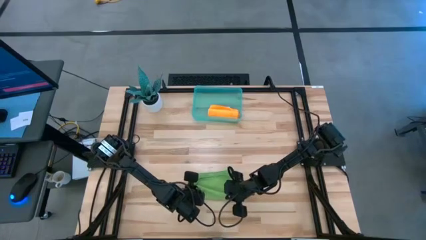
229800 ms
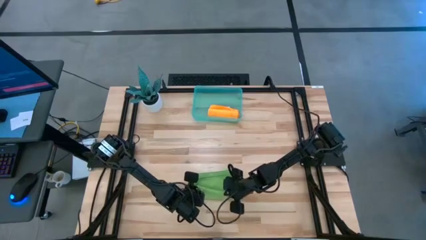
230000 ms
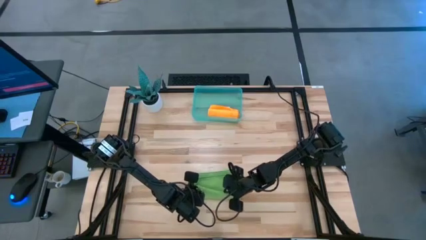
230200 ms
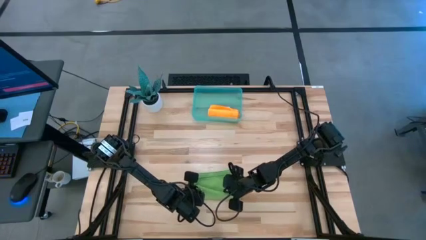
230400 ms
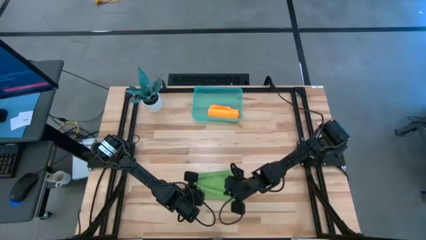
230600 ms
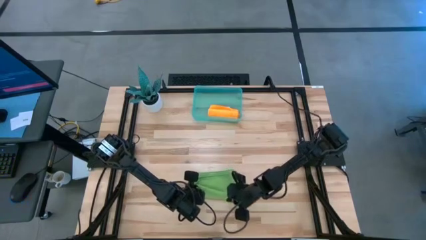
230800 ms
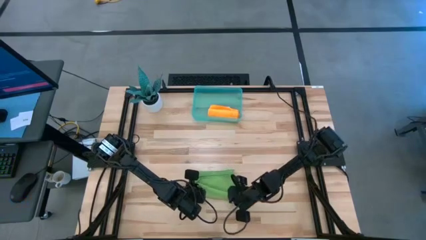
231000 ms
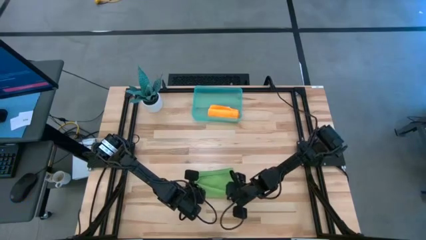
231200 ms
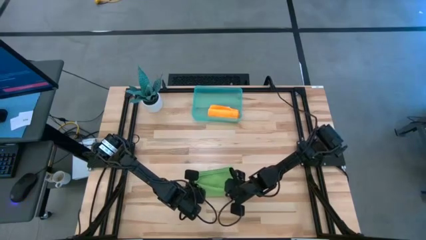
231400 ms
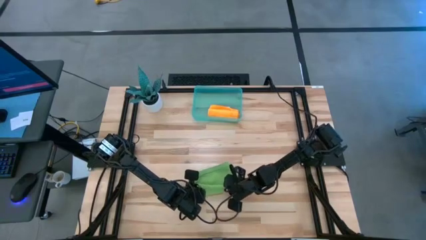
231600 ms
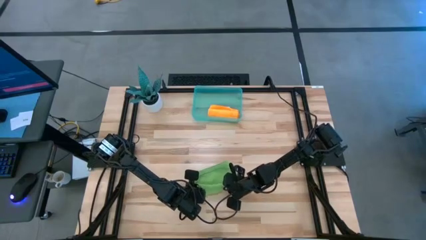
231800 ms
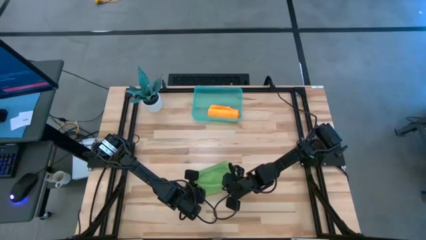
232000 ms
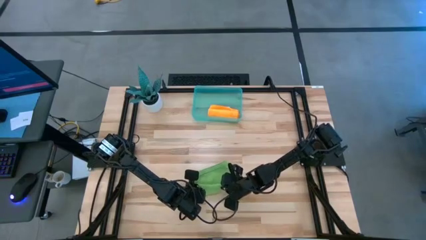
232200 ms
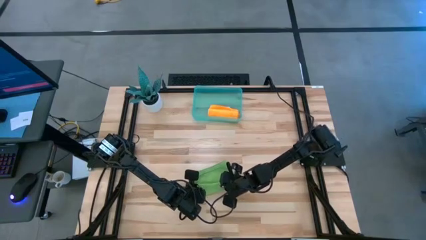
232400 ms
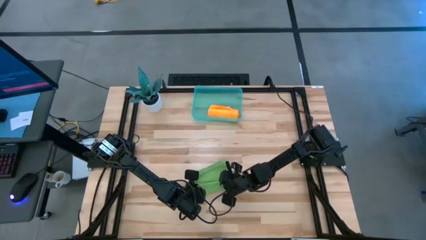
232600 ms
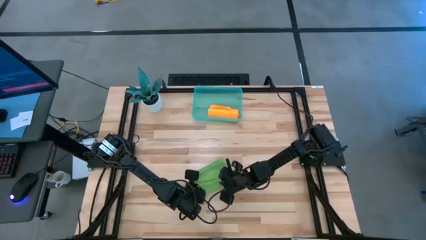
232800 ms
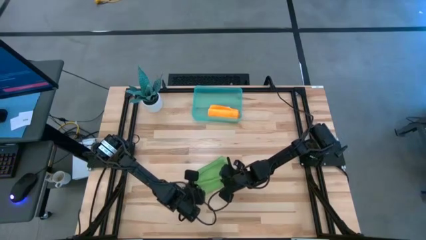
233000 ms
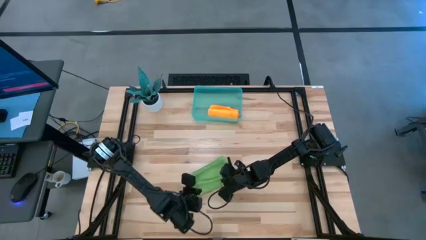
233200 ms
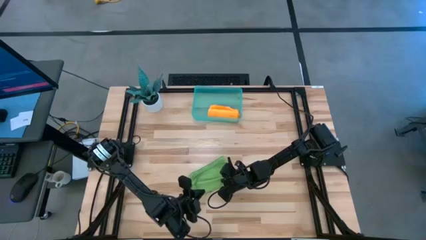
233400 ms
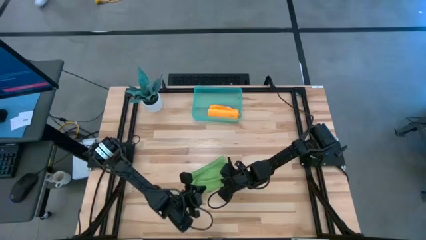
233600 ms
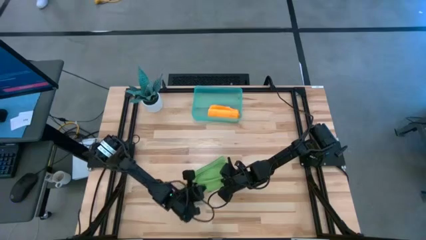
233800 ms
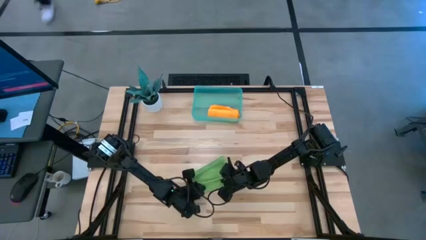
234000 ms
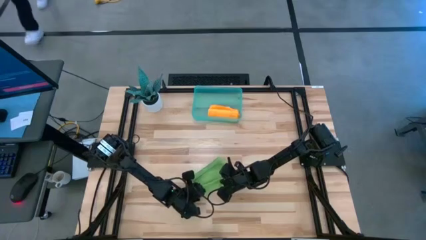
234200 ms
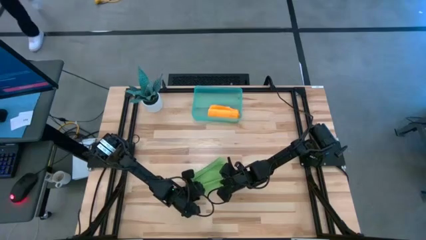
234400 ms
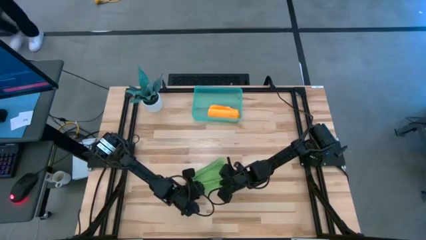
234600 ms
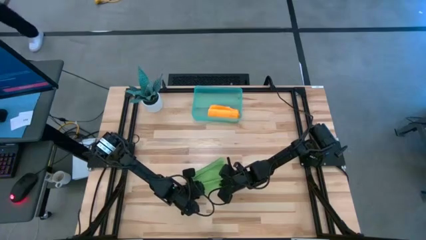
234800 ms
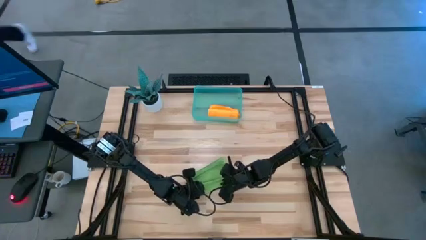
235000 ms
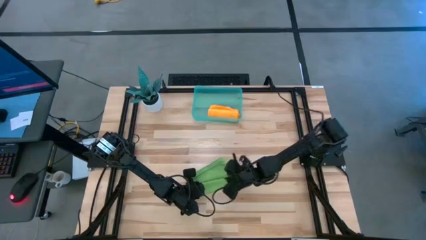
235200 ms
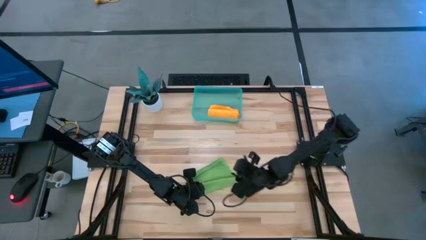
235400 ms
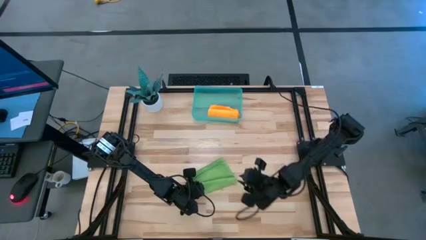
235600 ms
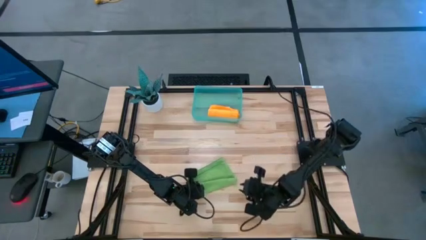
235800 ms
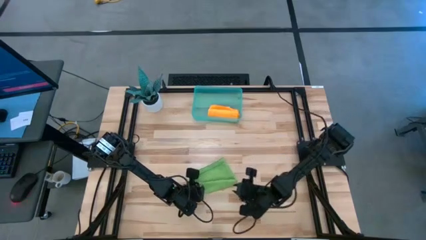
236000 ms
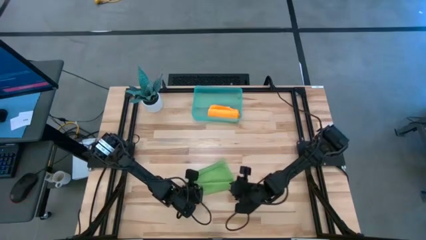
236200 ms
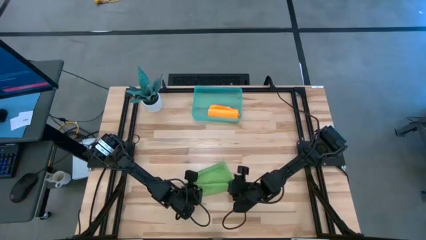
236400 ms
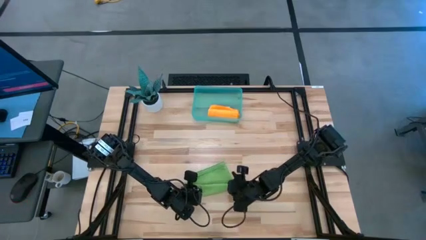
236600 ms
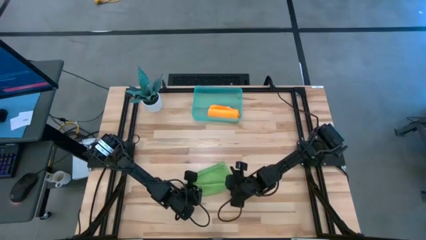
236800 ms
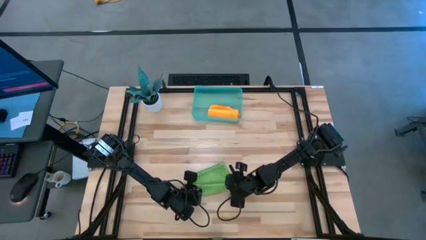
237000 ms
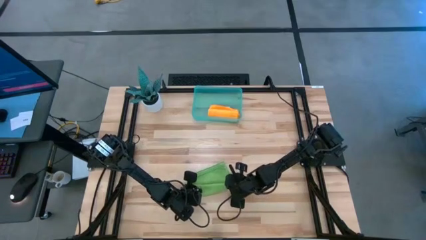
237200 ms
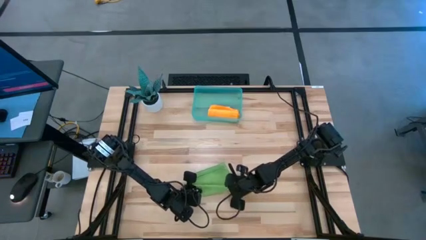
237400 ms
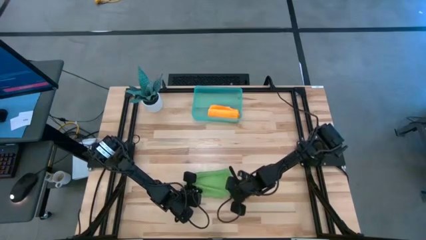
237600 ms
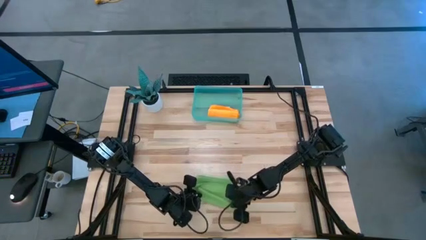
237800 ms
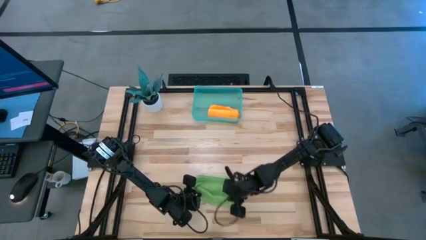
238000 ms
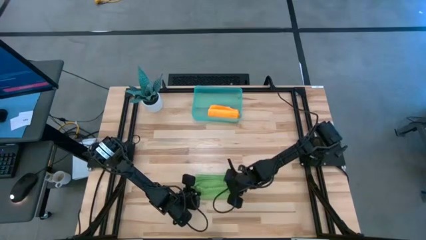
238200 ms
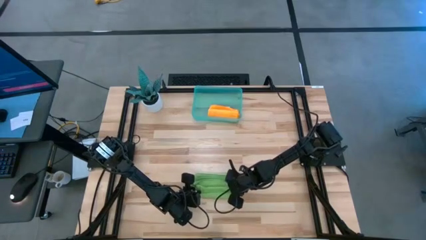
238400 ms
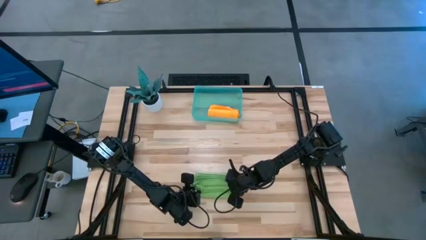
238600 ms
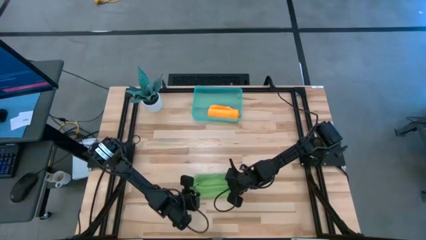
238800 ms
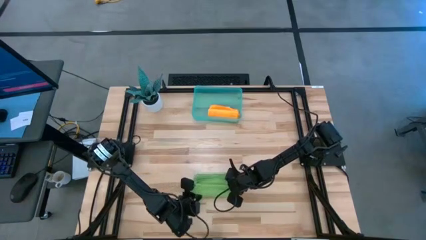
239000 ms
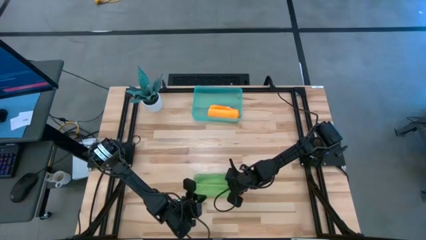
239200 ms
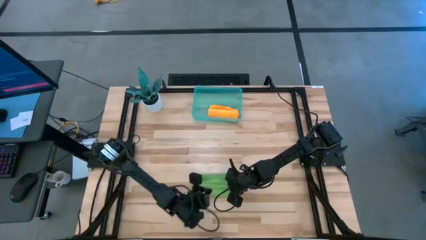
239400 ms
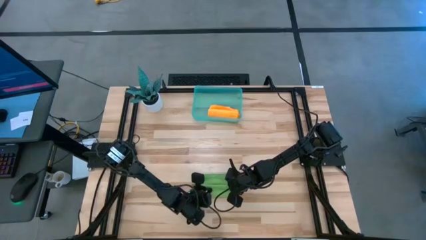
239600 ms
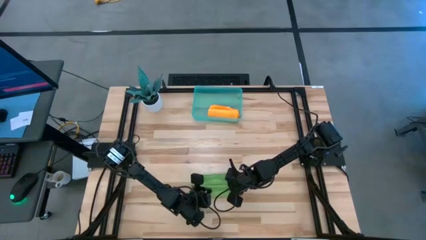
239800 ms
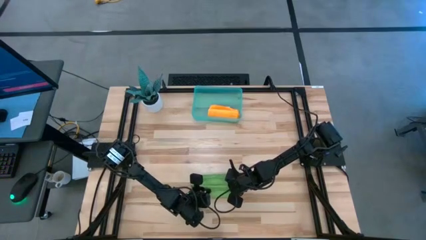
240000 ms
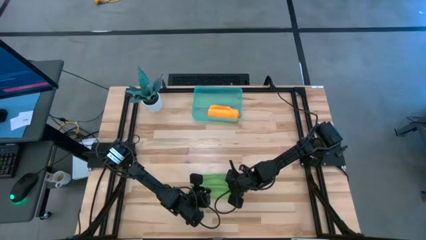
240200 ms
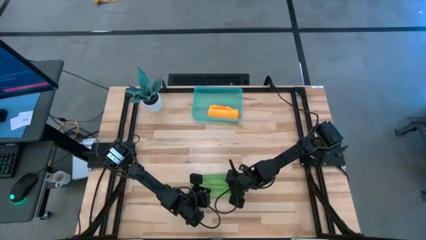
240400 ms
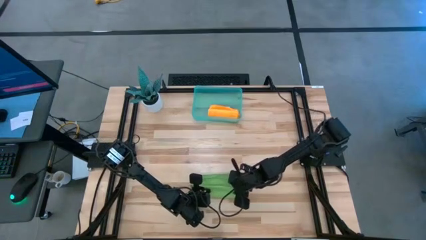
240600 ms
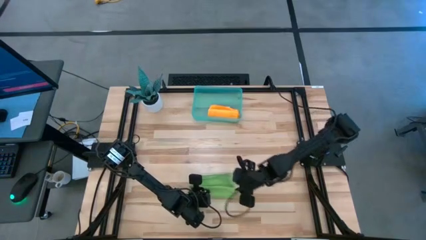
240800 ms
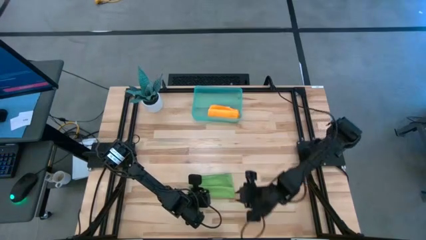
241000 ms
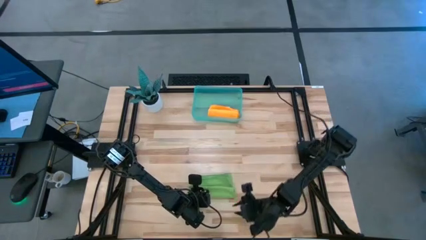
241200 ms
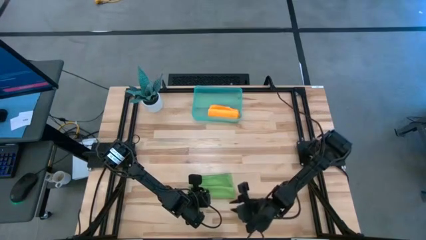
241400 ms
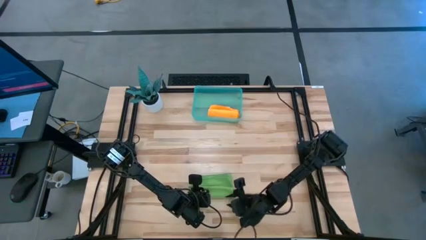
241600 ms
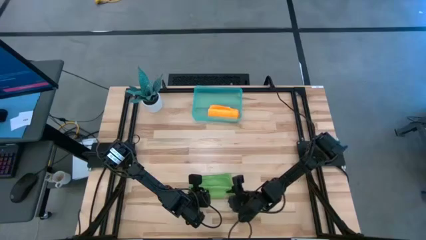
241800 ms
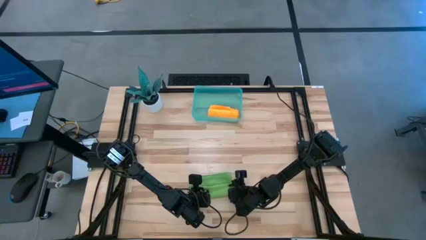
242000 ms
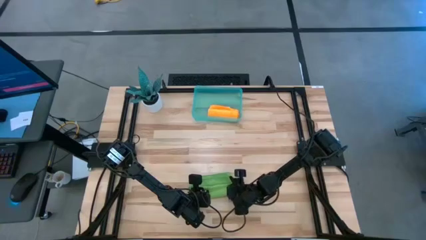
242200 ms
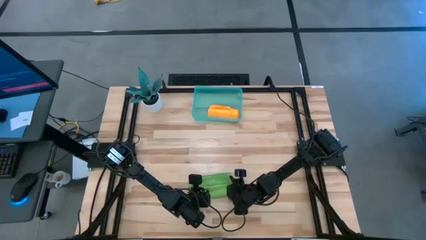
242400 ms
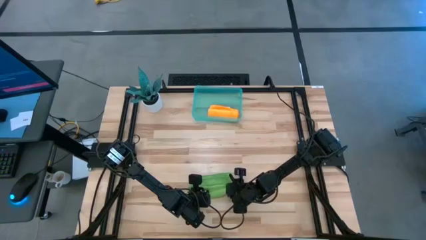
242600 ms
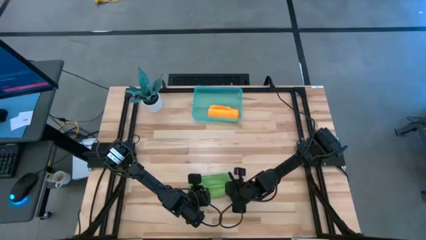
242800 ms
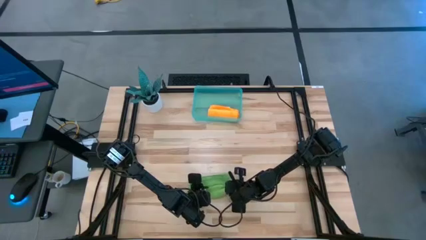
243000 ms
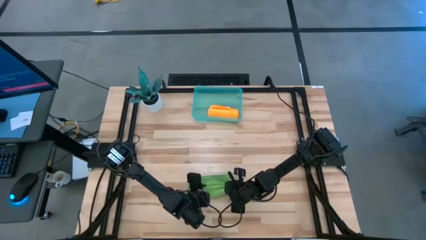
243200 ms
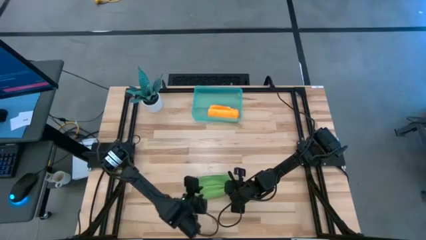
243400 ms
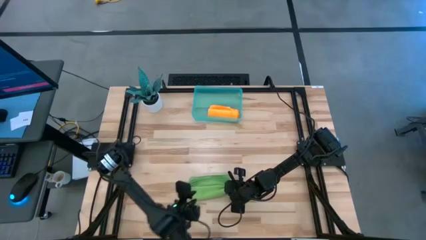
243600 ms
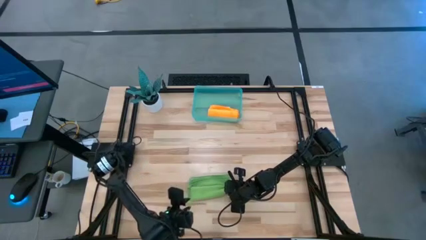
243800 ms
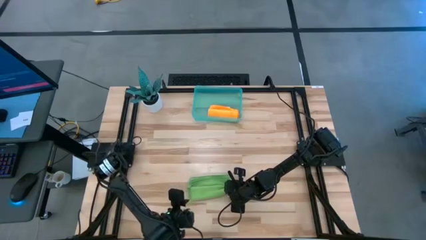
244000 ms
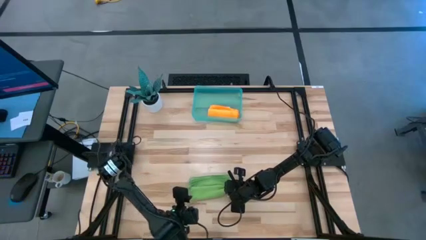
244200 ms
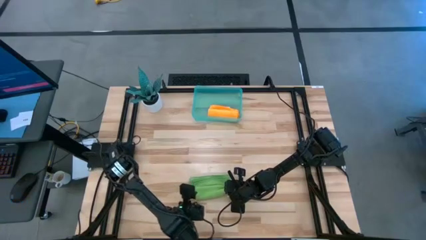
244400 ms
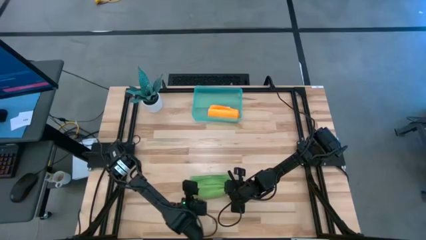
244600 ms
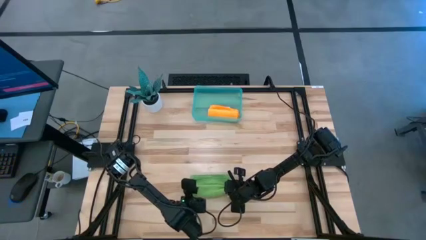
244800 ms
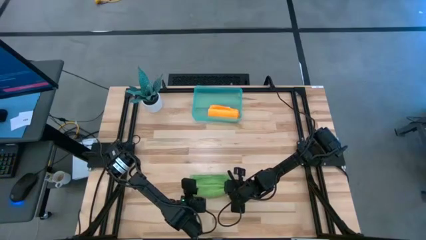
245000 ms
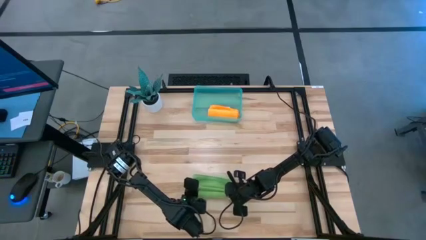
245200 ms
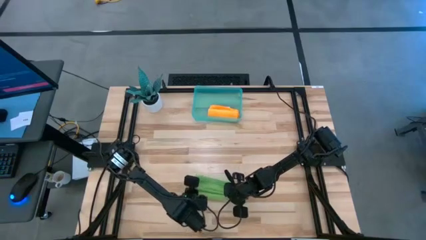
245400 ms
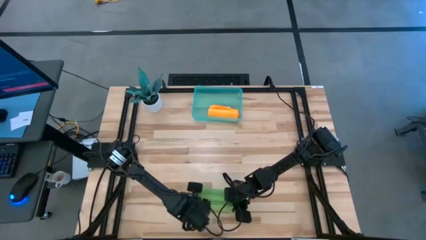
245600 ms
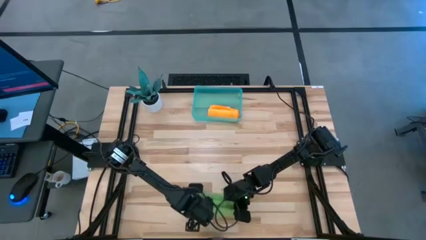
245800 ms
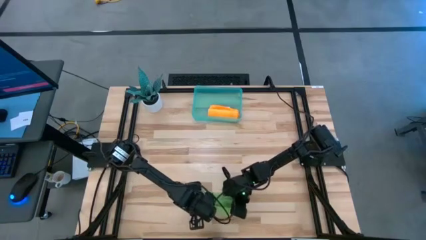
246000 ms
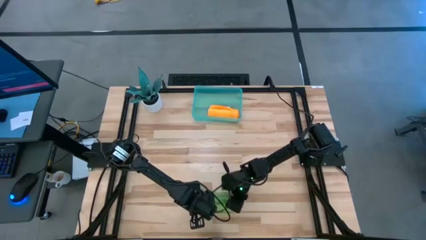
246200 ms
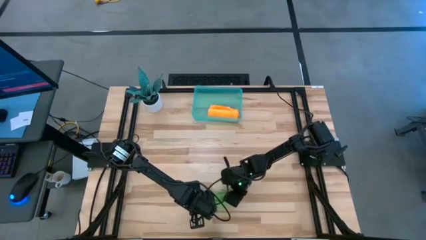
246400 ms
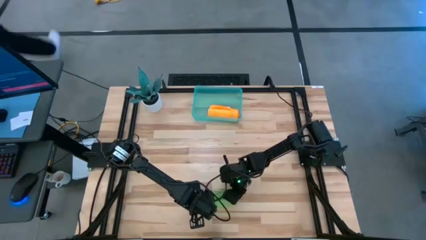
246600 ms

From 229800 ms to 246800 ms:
Task: Roll microfiber towels into tight, uniform cylinder then place into a basket
Roll the green microfiber cloth
